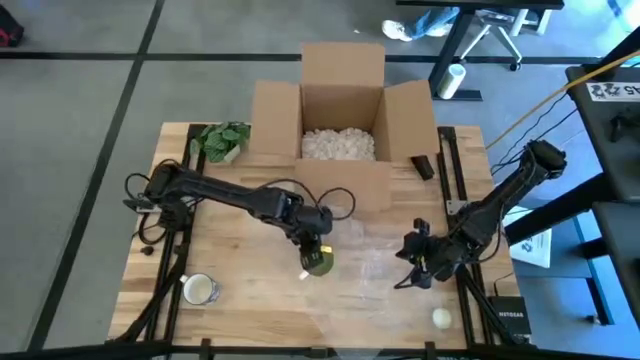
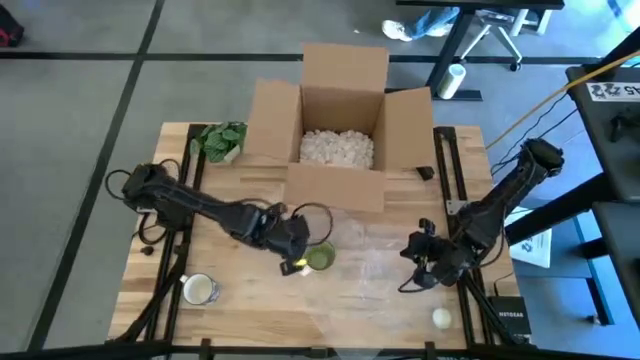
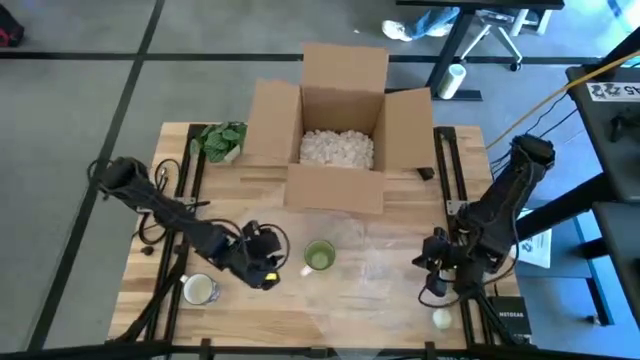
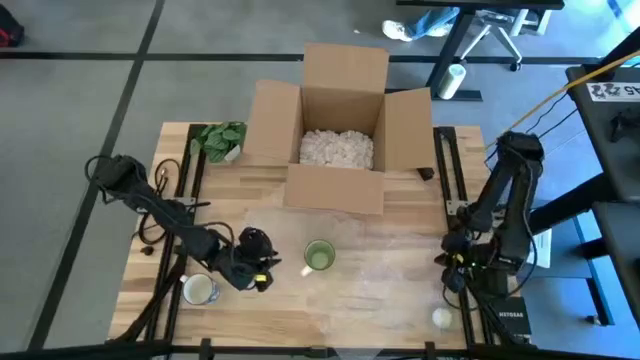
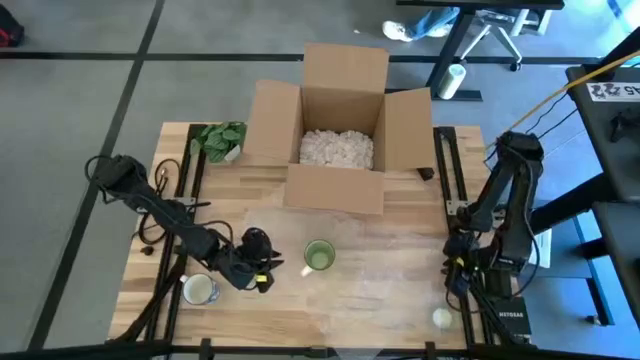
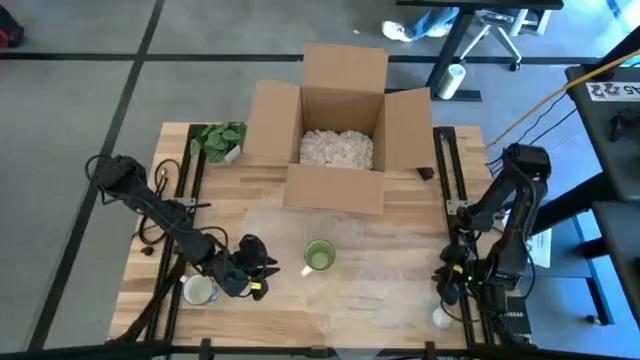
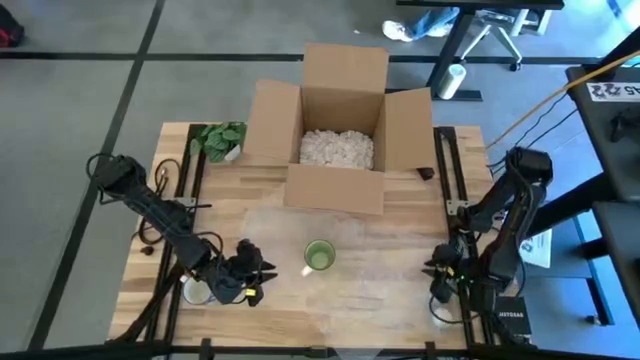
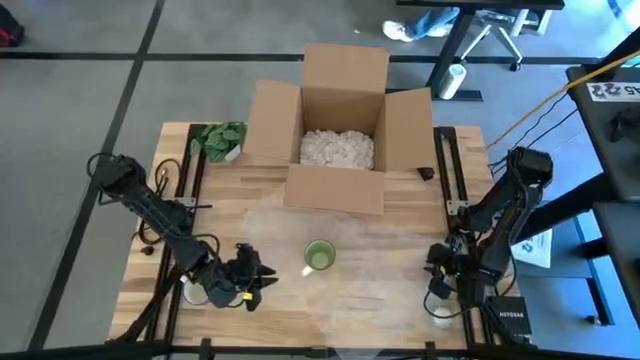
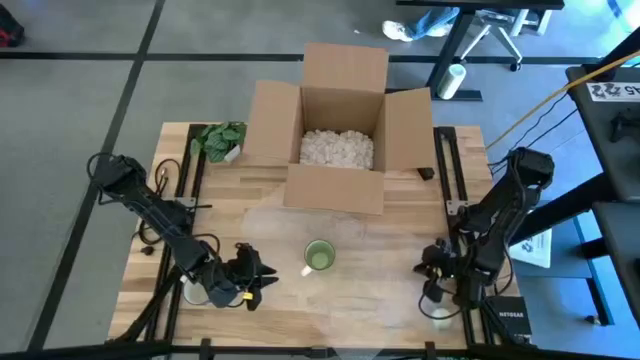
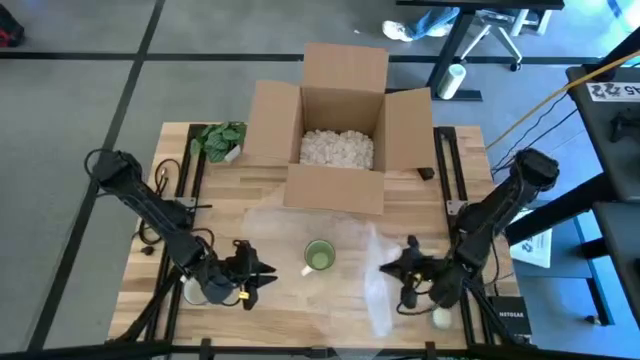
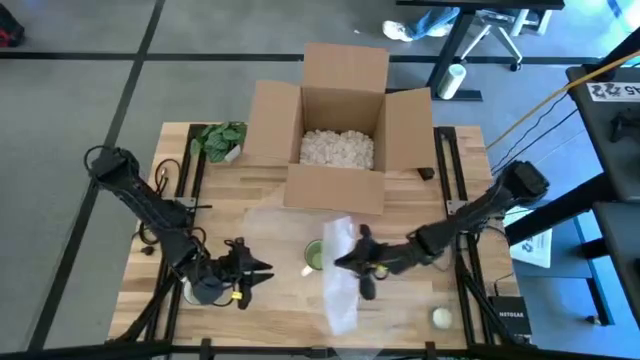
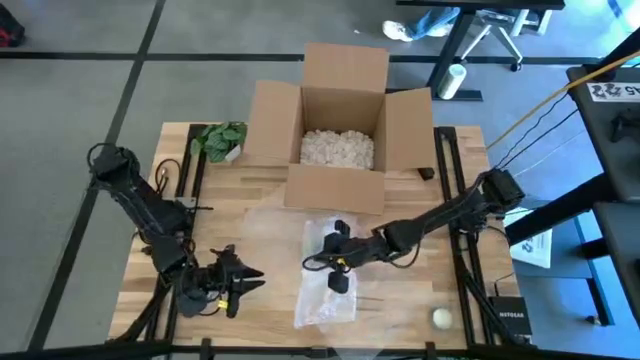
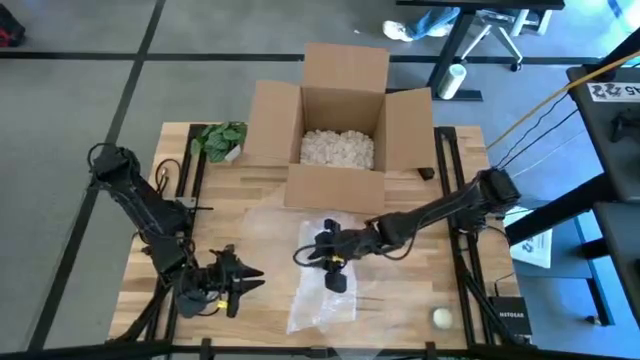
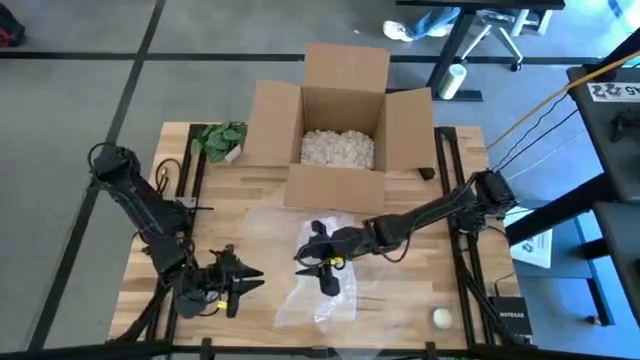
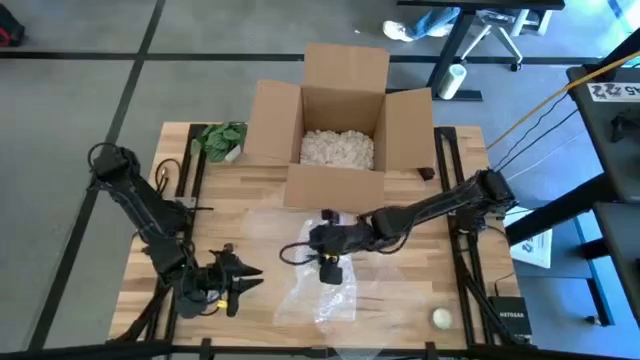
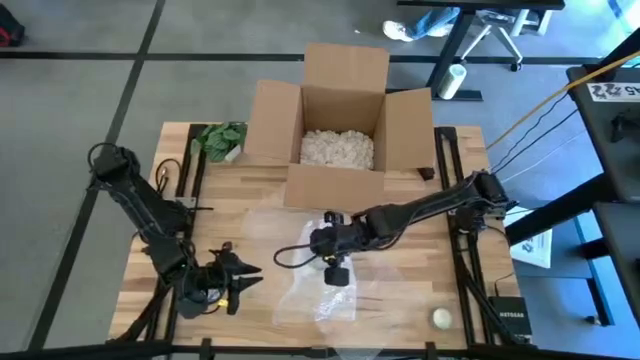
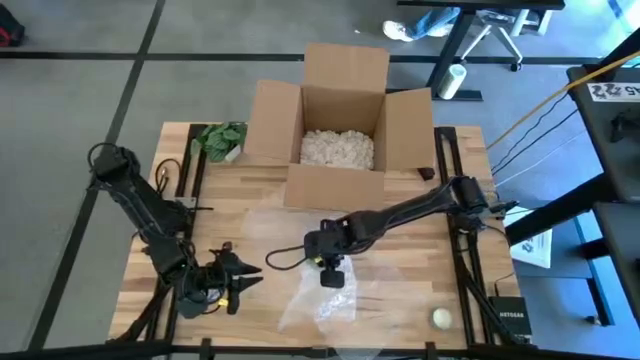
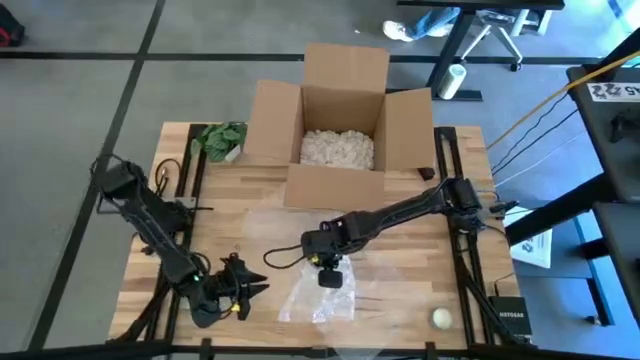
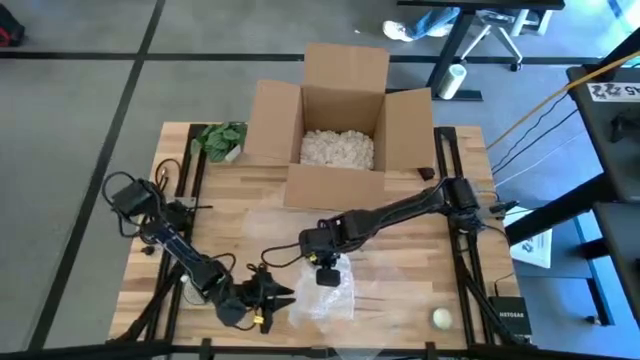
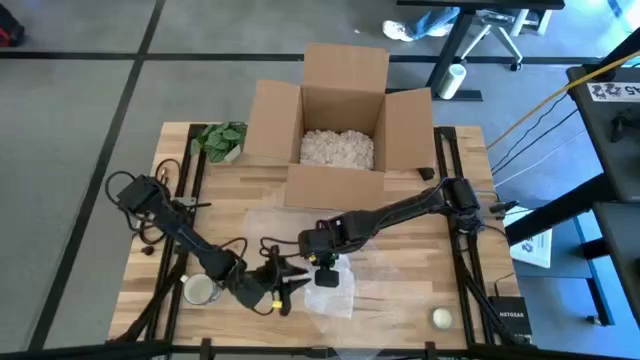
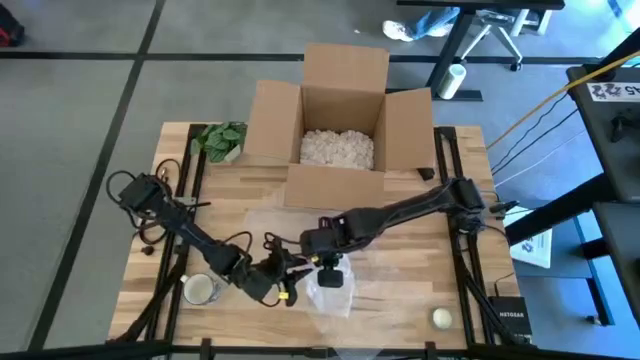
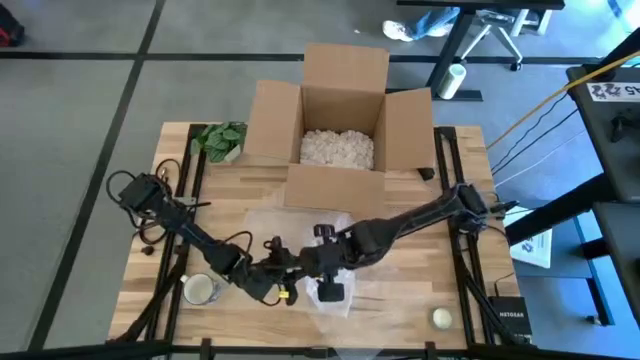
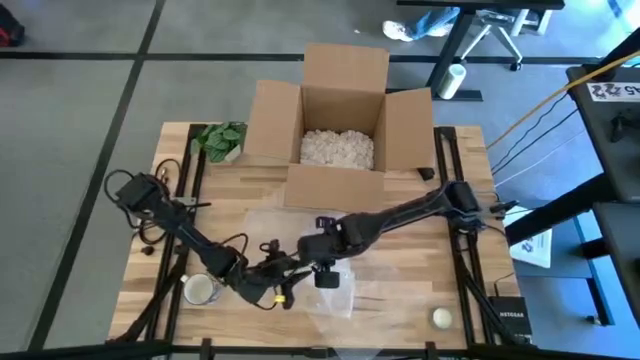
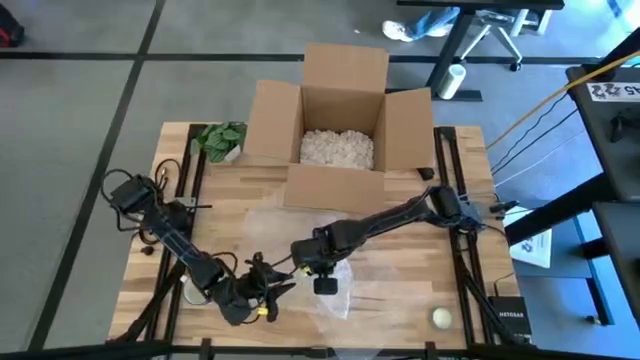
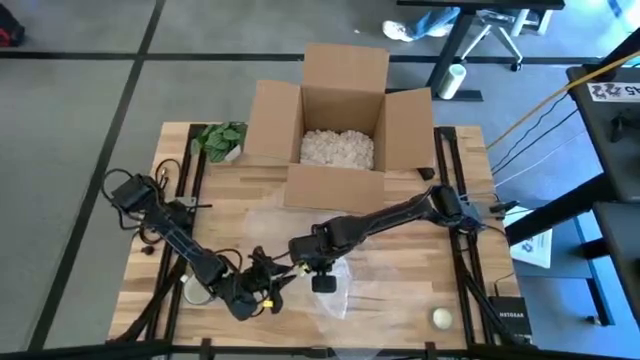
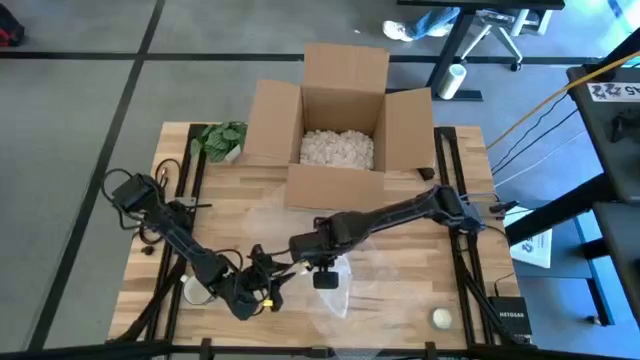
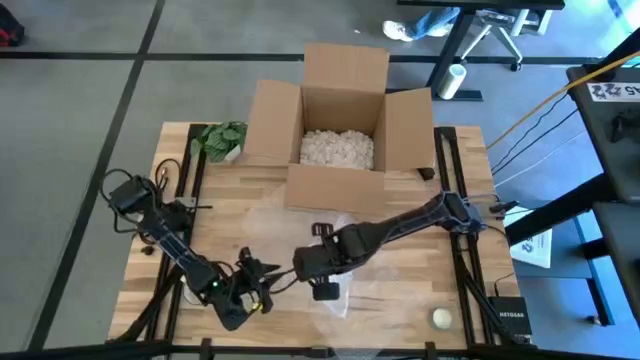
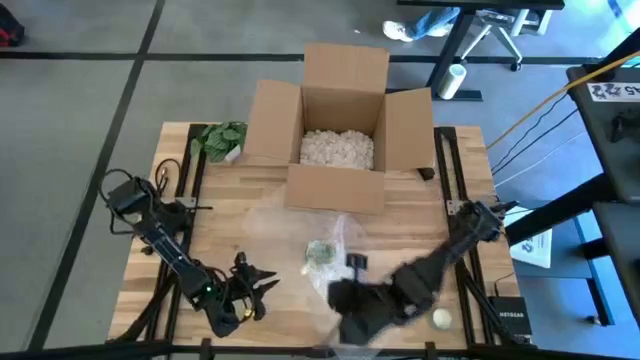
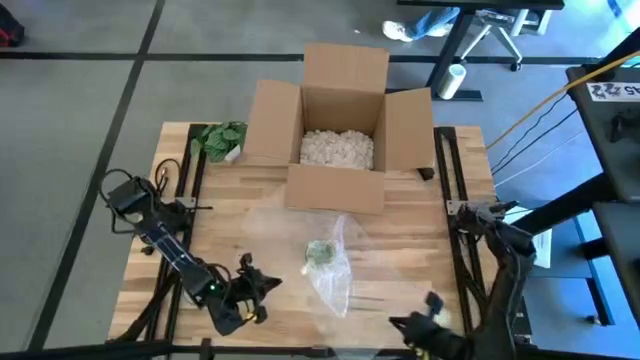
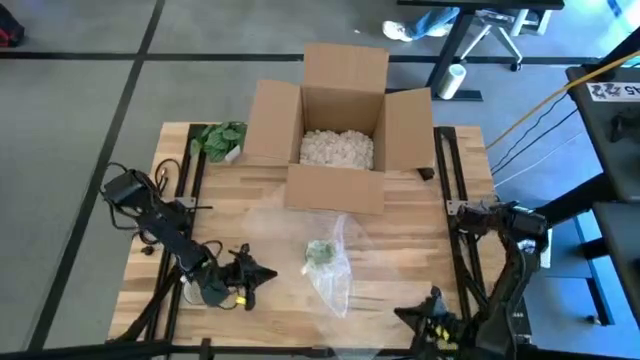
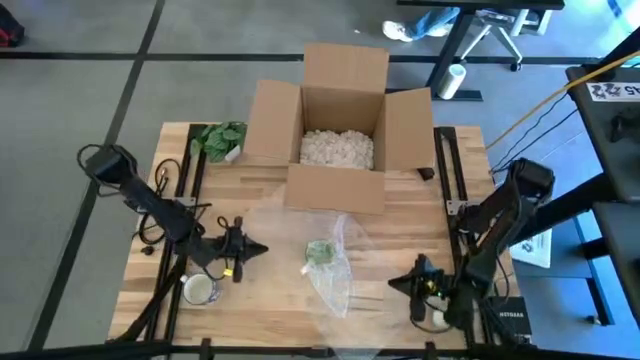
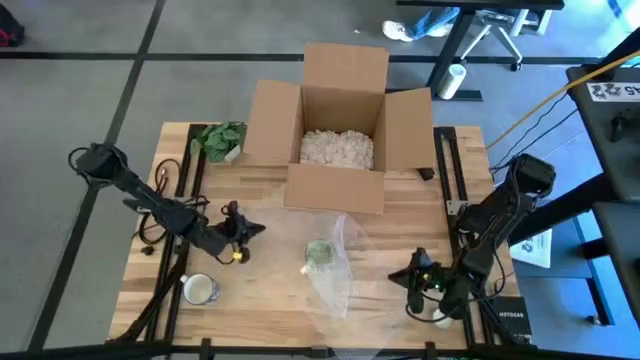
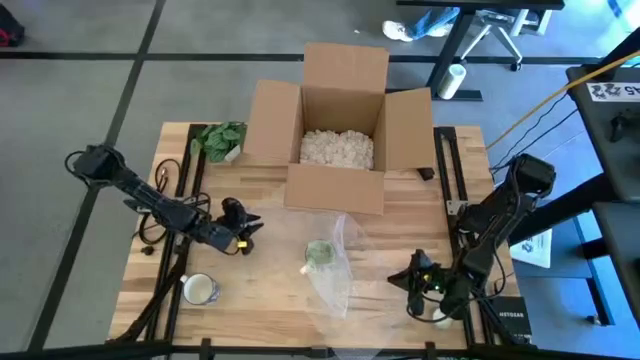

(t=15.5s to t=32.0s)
Task: wrap mug
Wrap the green mug with the bubble wrap
